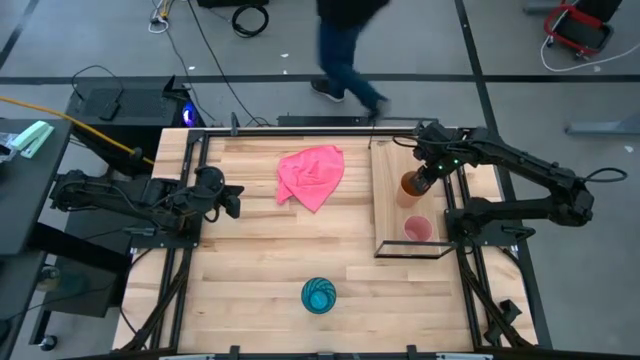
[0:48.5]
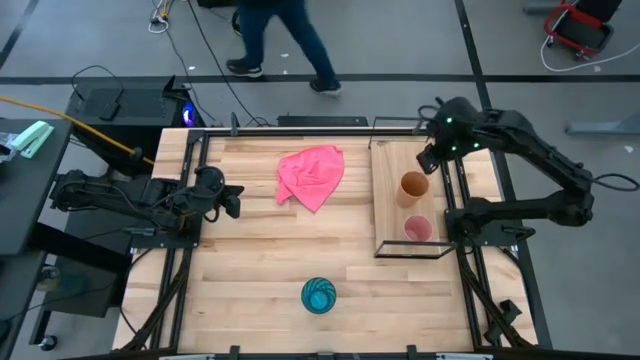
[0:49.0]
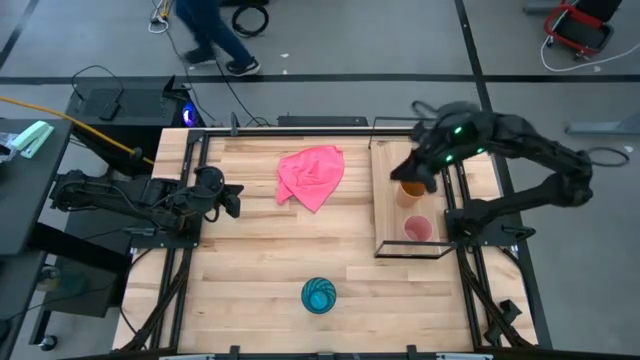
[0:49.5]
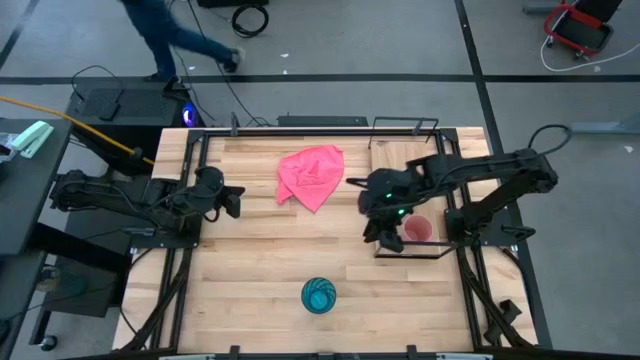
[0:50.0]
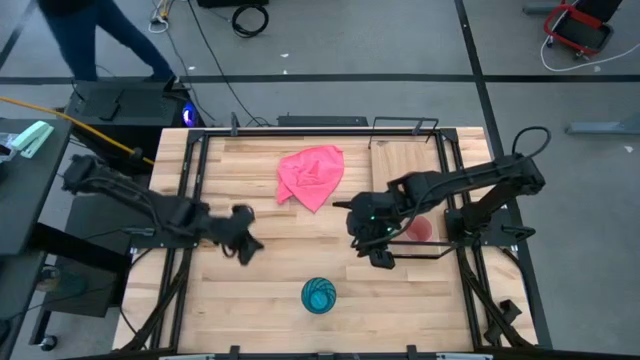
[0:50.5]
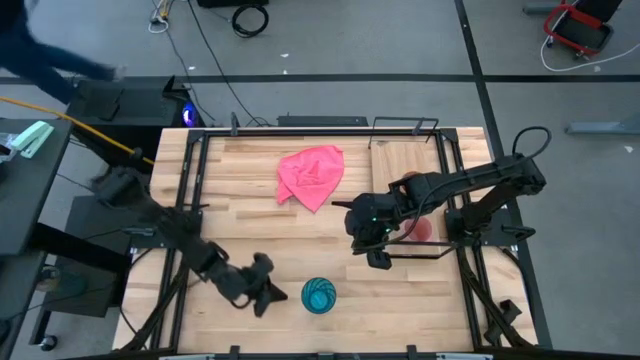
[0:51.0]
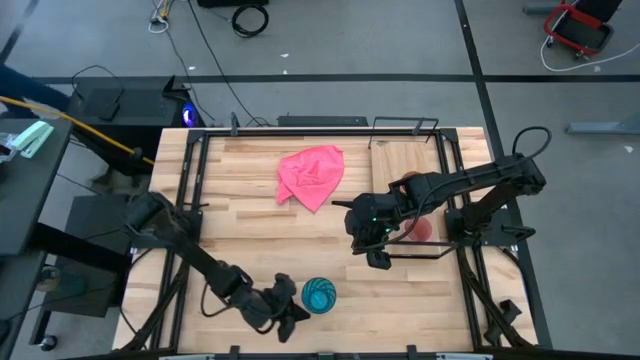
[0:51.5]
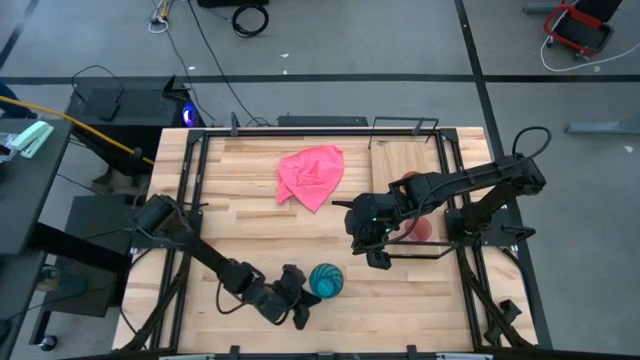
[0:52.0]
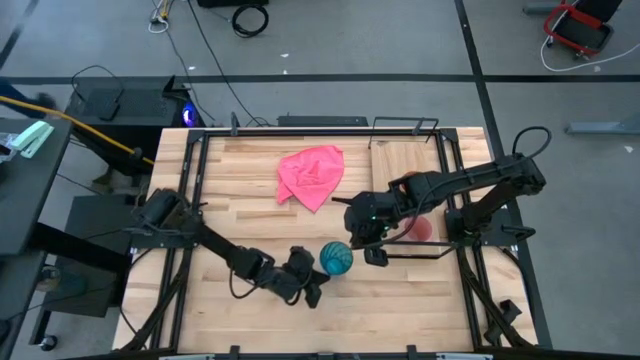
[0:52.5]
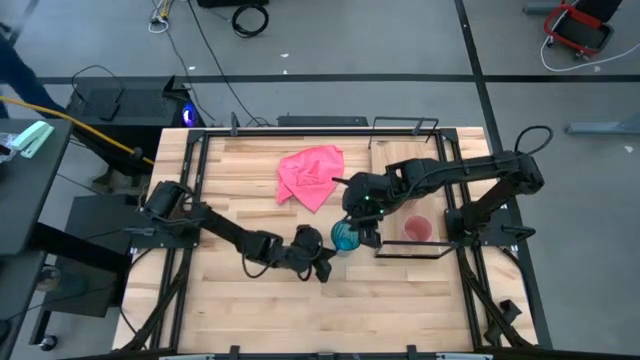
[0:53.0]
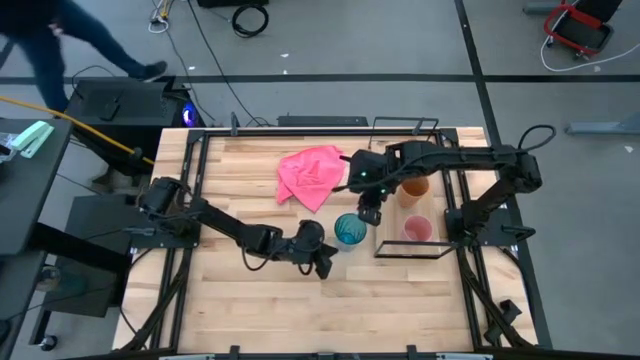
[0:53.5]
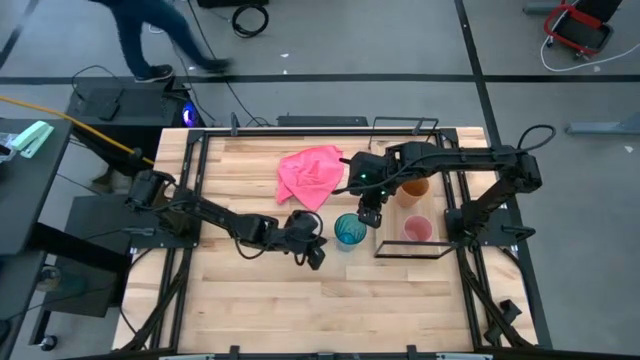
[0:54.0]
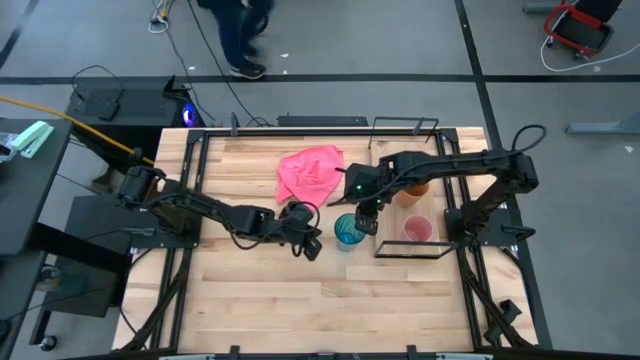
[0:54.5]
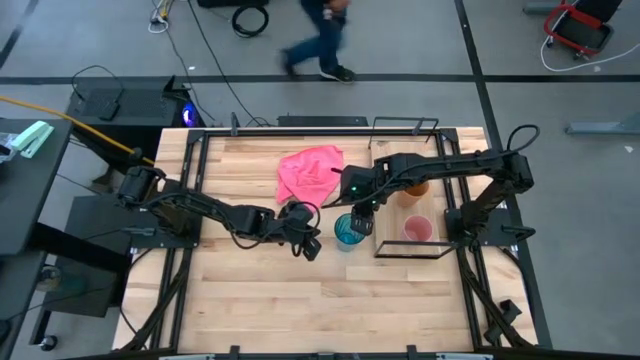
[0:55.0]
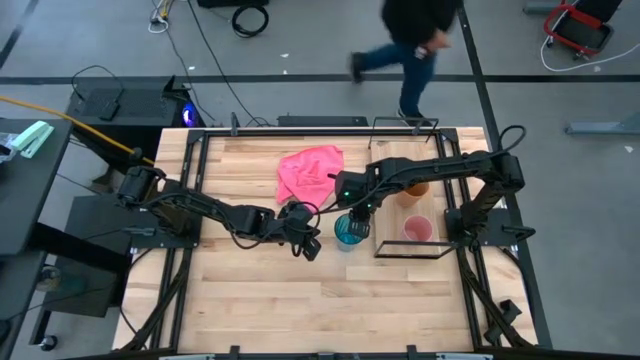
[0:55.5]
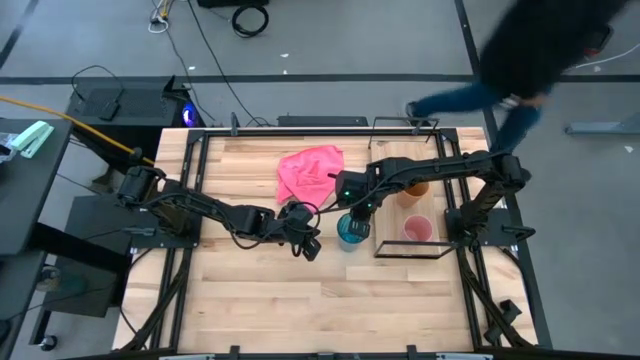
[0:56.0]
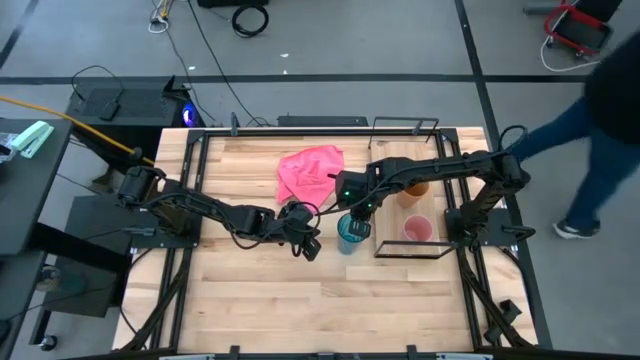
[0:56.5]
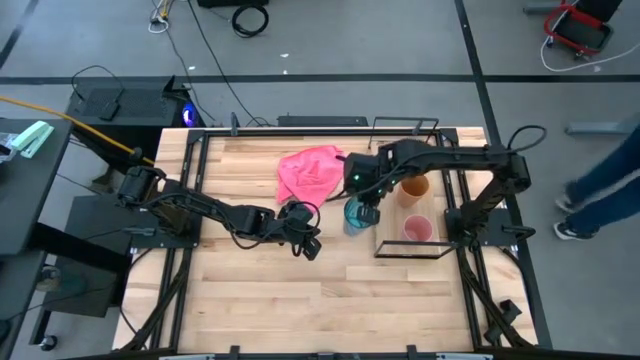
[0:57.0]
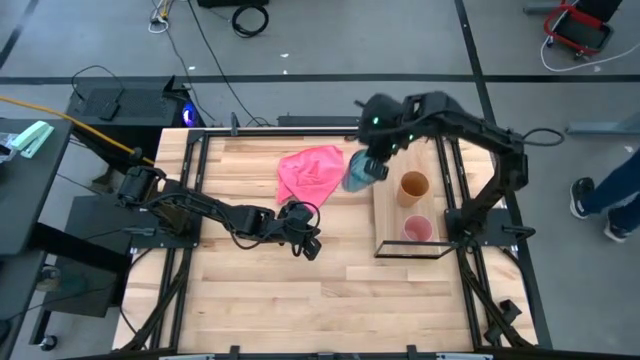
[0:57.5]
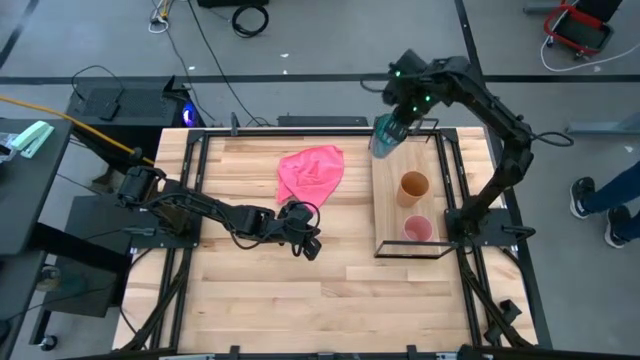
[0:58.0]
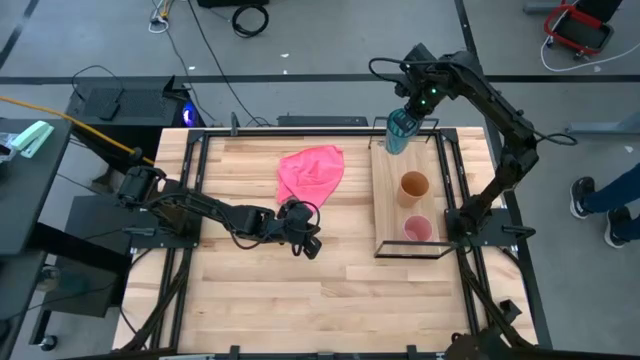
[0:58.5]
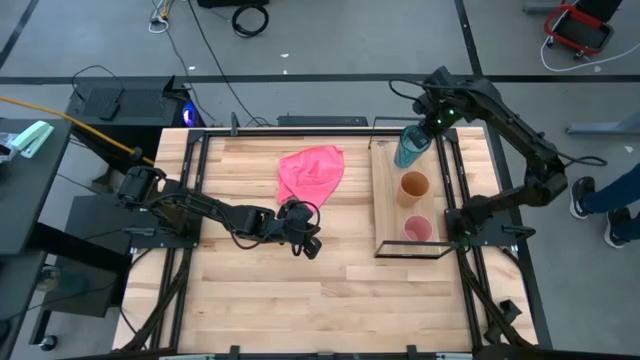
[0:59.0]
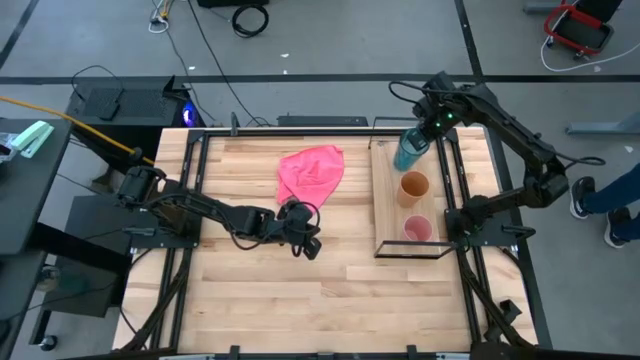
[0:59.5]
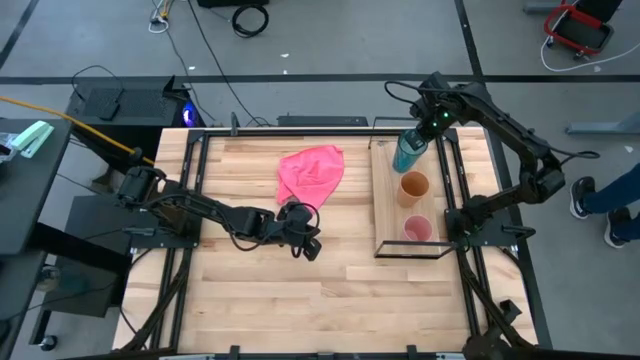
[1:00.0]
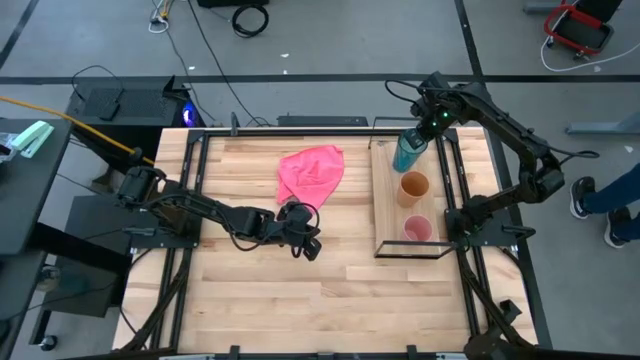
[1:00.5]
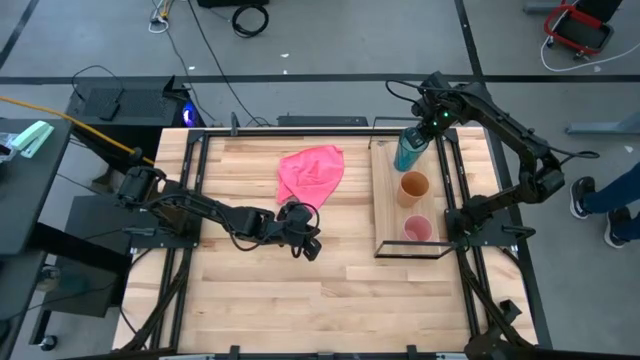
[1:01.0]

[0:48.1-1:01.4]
Task: Stack small to large cups/mugs on shelf
Put the blue glass cup on the shelf

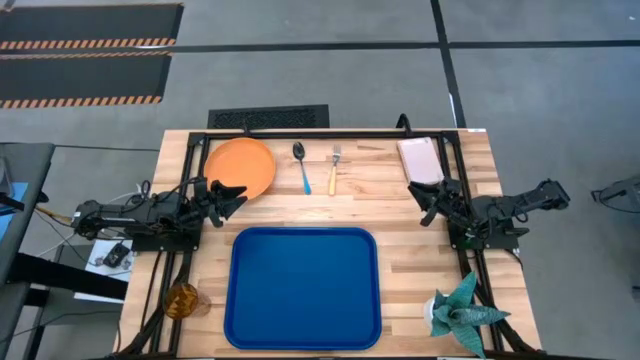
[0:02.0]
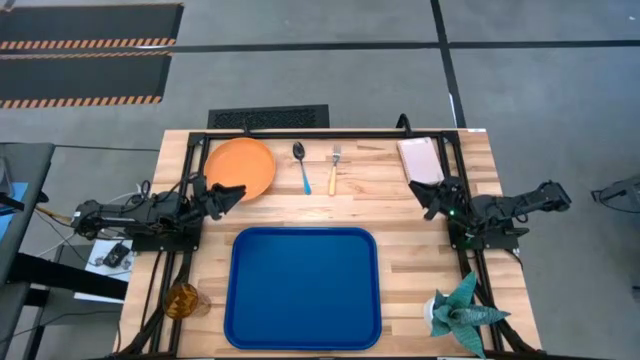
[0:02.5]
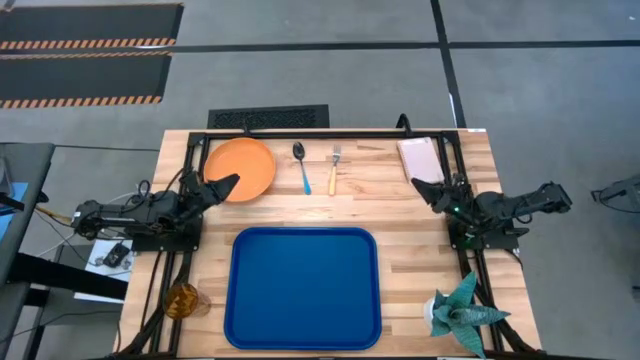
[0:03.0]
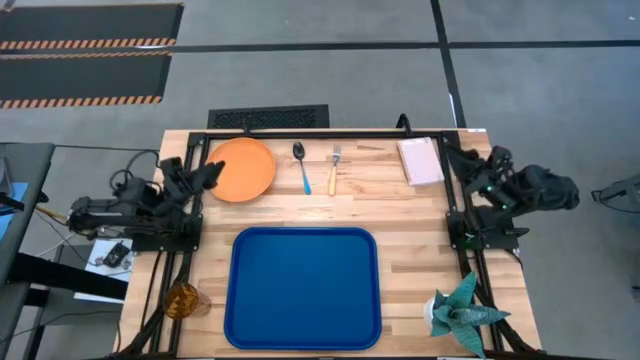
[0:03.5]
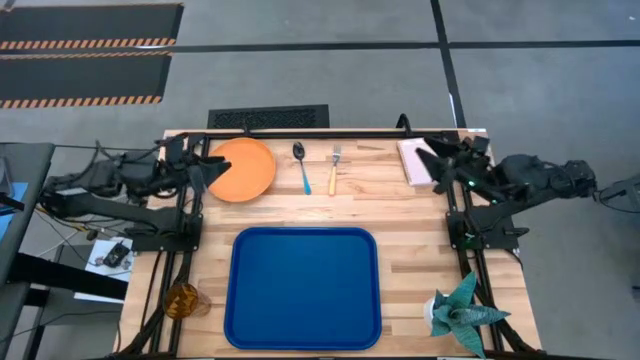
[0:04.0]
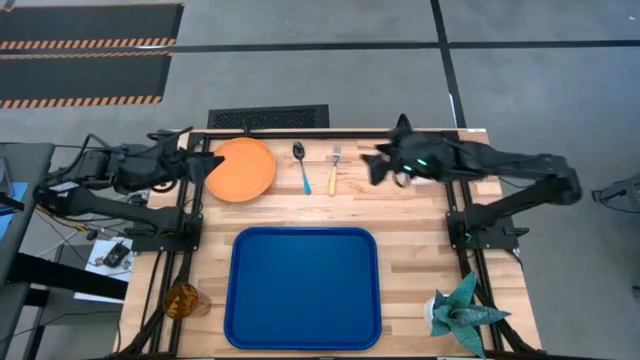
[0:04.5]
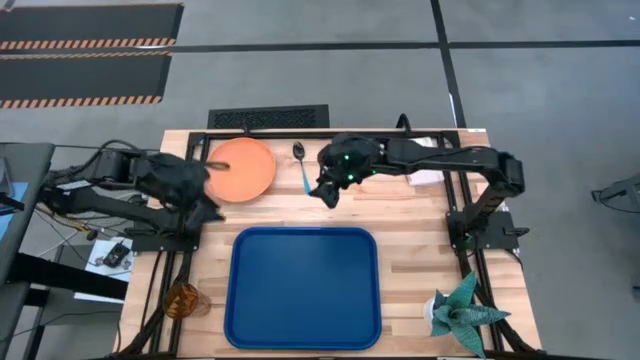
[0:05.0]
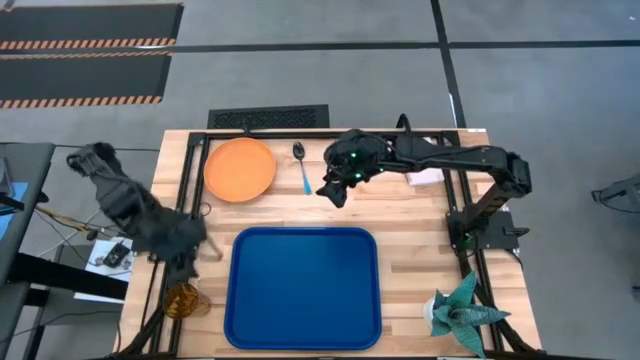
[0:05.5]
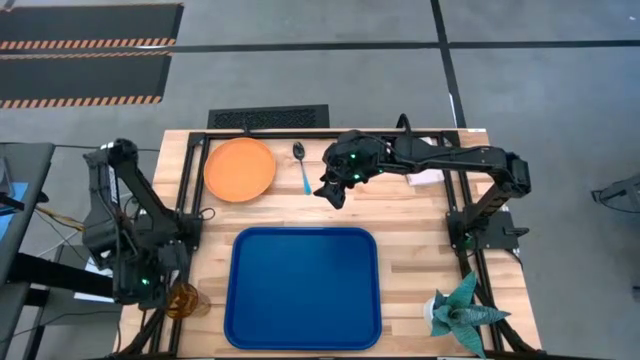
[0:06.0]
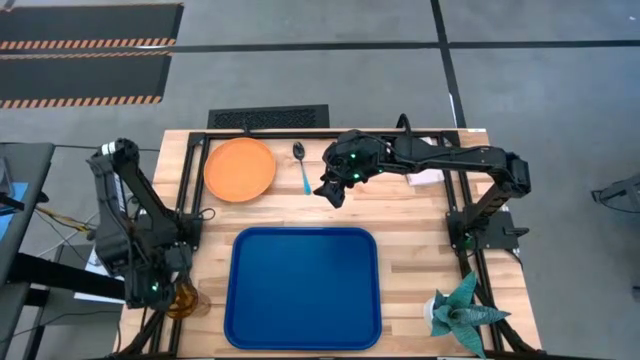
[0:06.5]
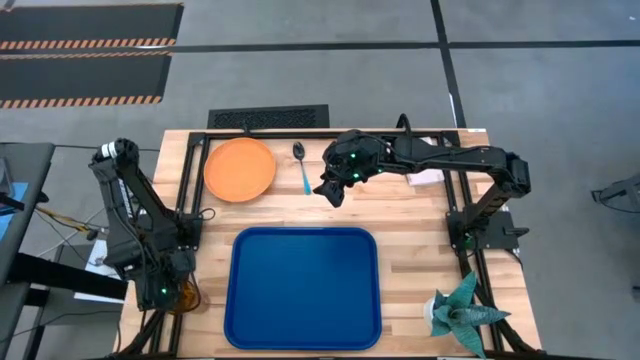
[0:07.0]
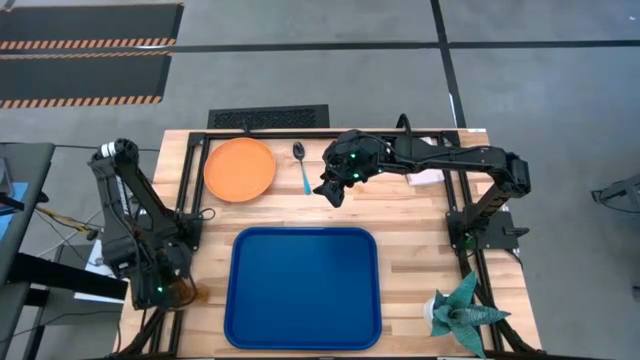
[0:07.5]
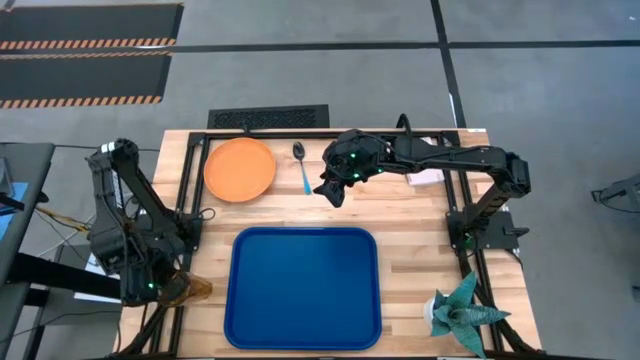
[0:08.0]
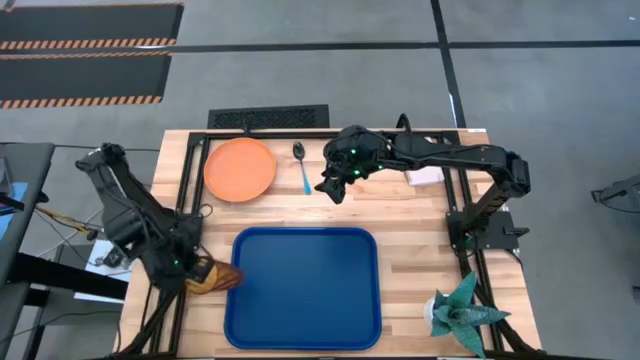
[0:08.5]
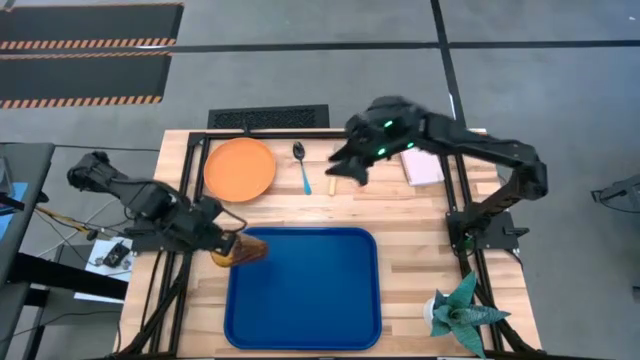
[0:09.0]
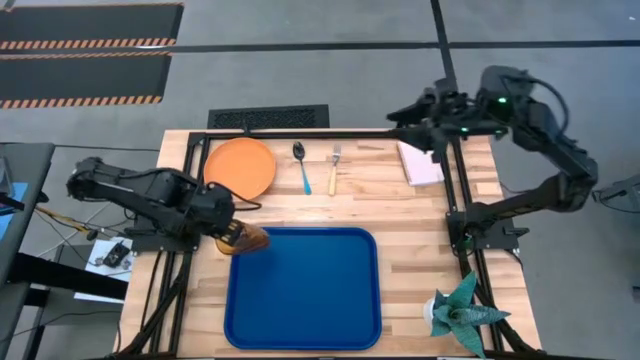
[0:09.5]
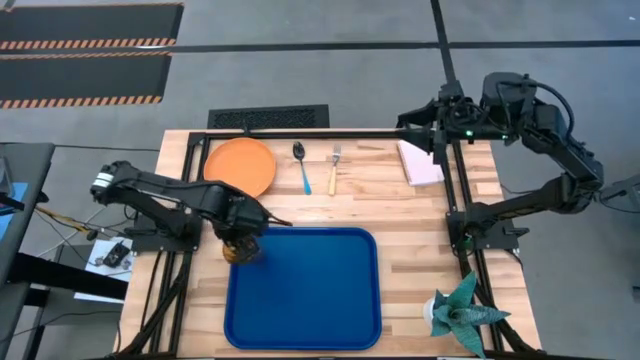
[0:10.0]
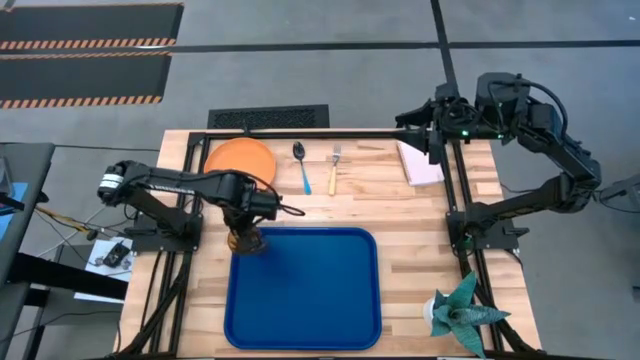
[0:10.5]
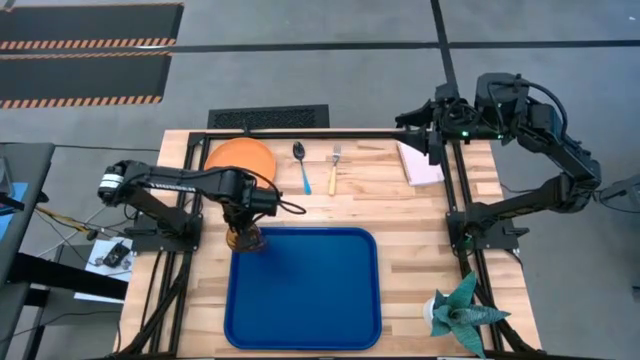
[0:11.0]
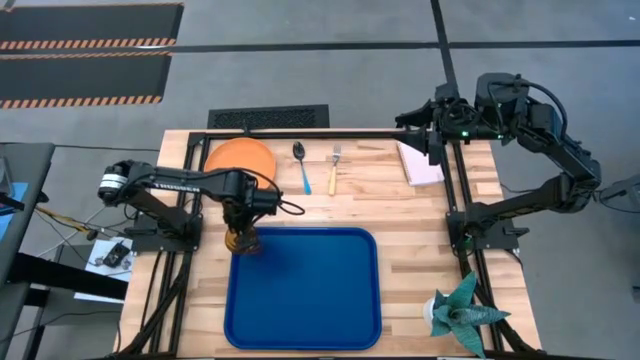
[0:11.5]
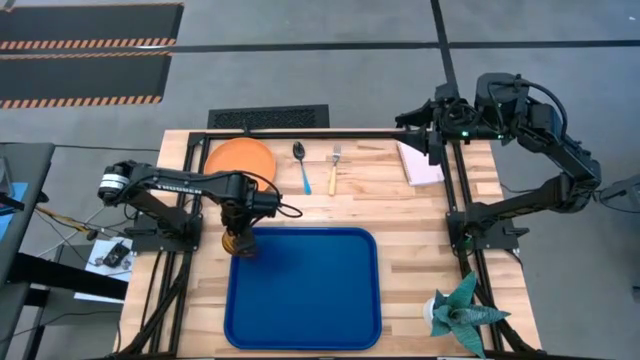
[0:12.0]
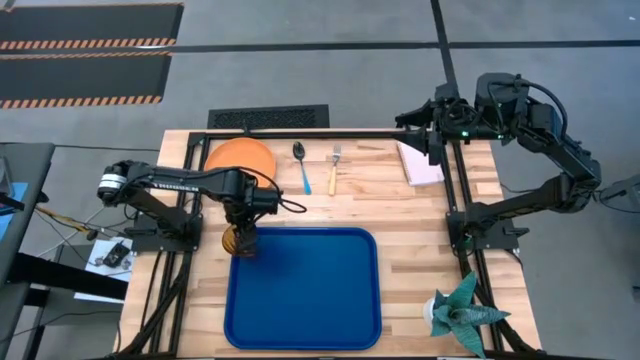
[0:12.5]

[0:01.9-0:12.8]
Task: Pick and place plate/cup/fork/spoon on tray
Put the brown cup on the top left of the blue tray
